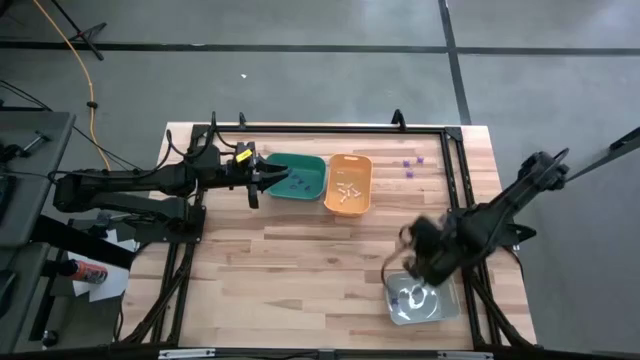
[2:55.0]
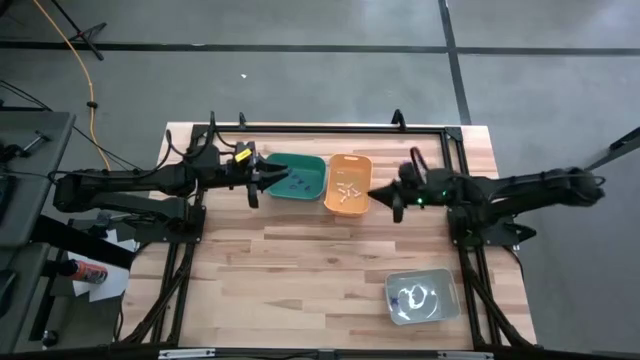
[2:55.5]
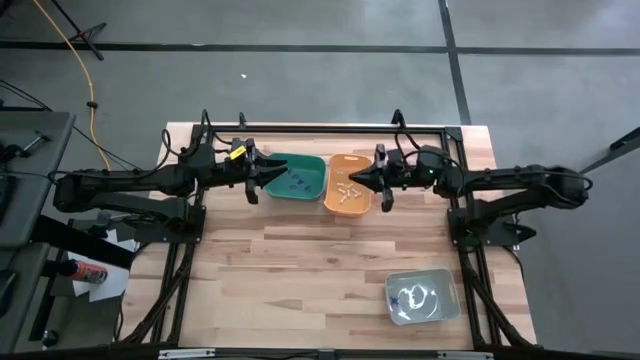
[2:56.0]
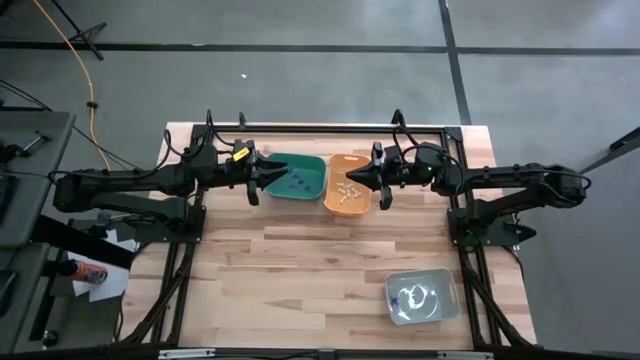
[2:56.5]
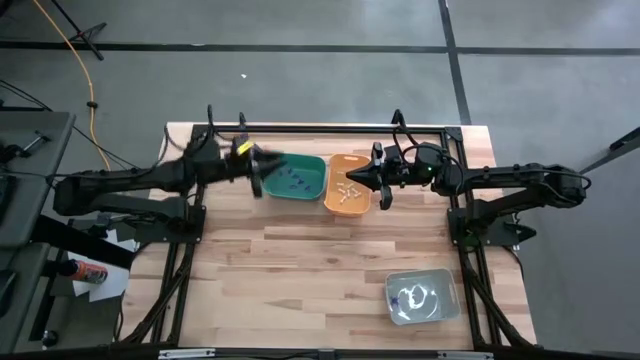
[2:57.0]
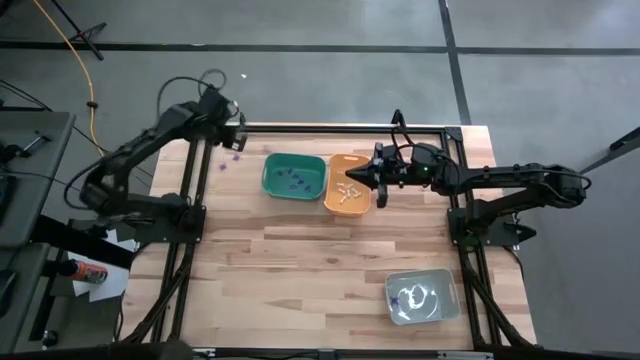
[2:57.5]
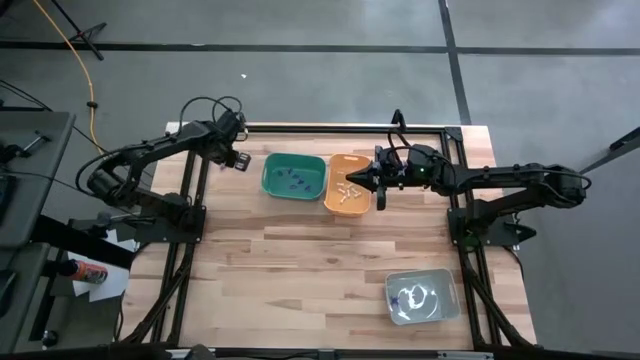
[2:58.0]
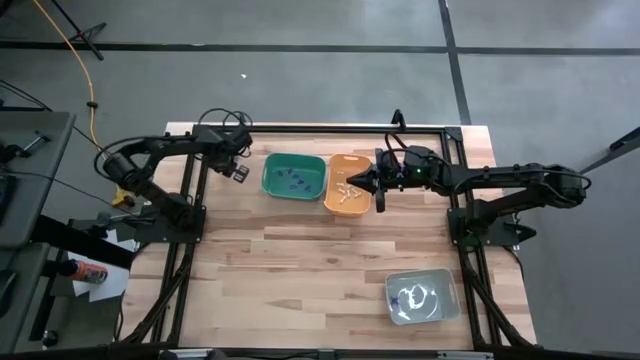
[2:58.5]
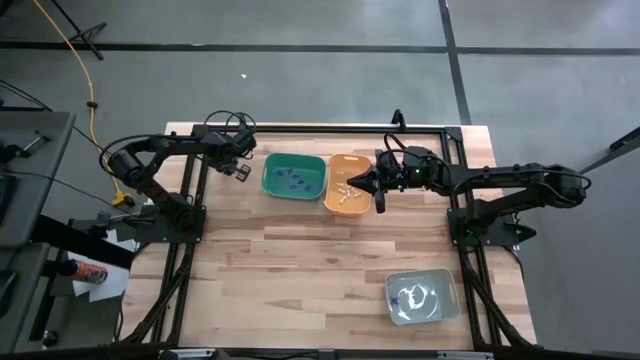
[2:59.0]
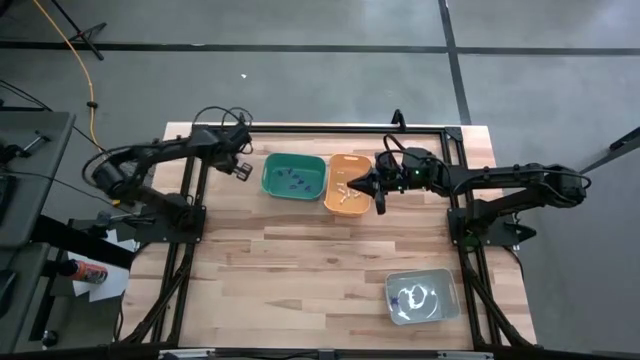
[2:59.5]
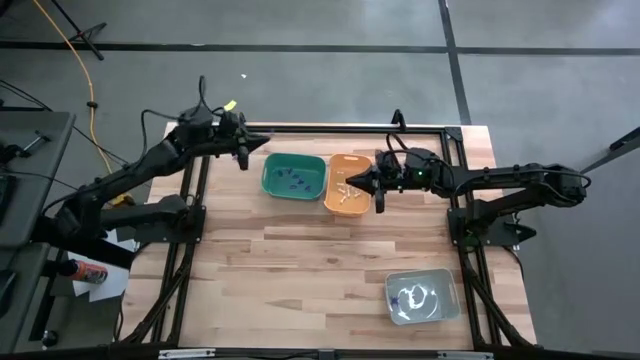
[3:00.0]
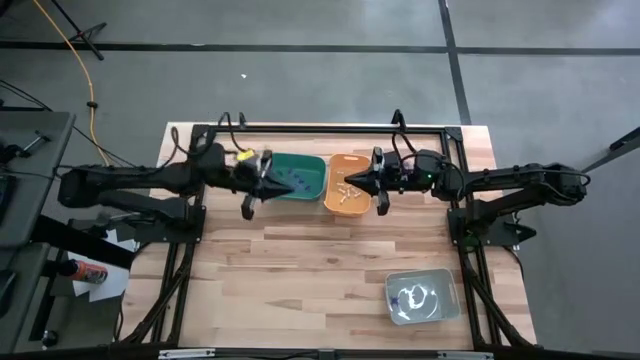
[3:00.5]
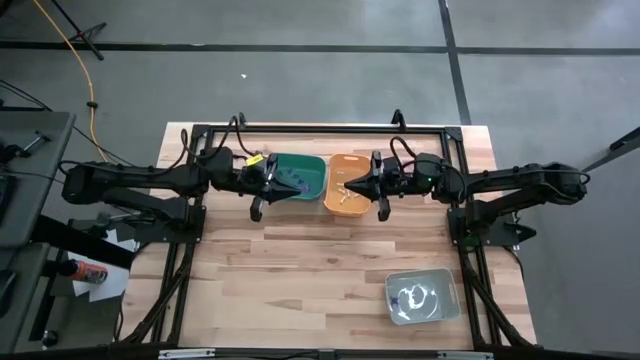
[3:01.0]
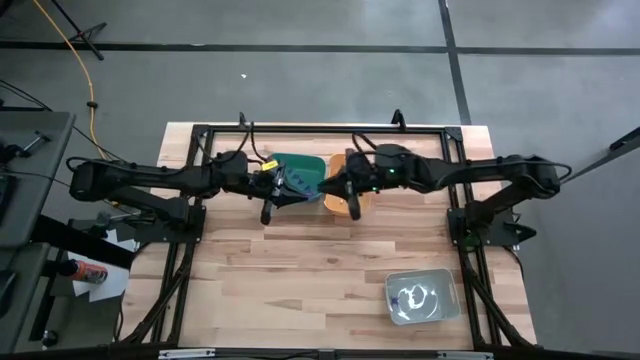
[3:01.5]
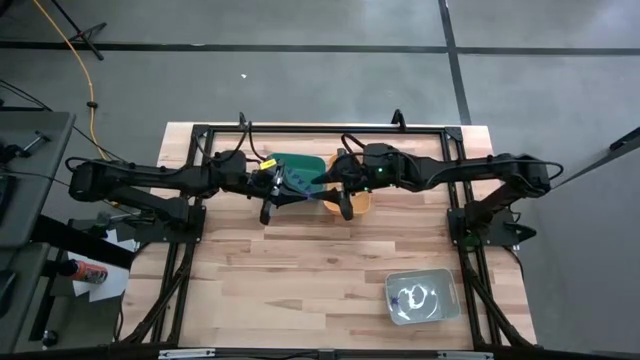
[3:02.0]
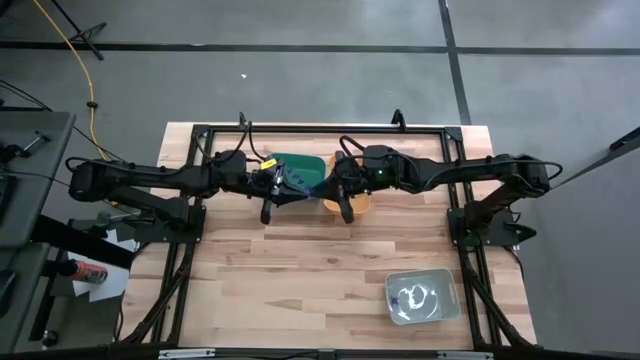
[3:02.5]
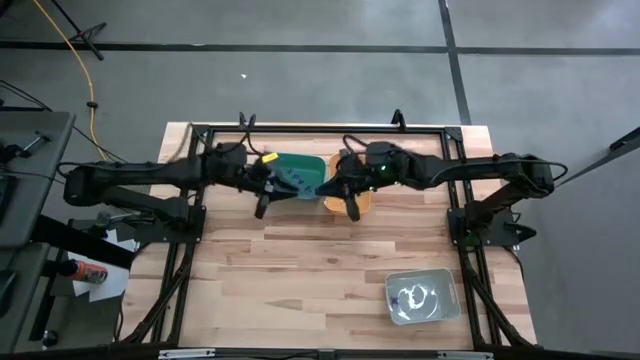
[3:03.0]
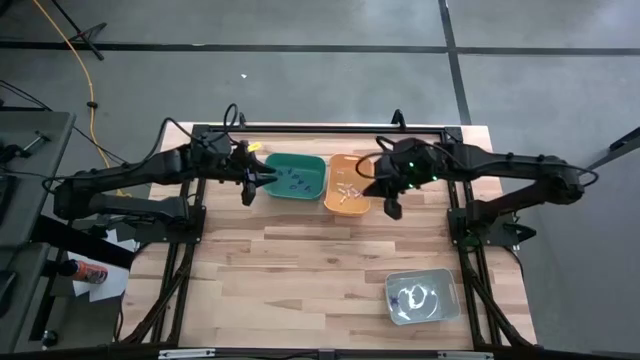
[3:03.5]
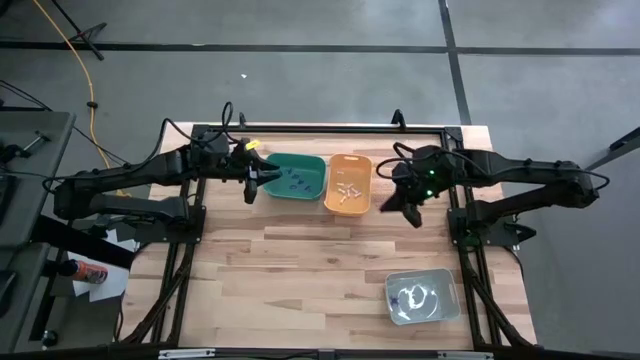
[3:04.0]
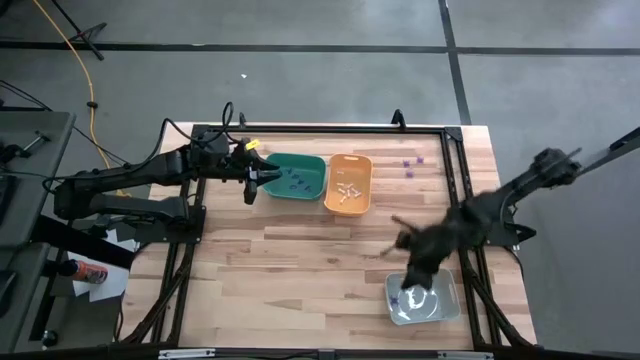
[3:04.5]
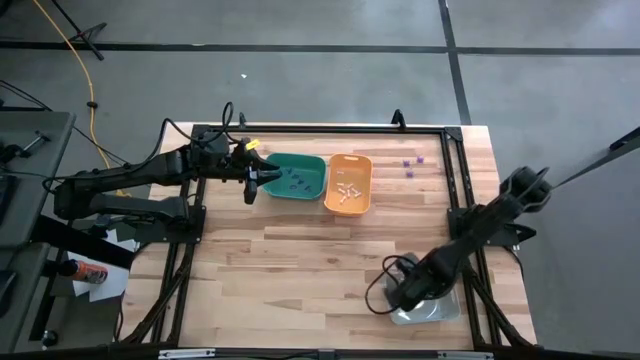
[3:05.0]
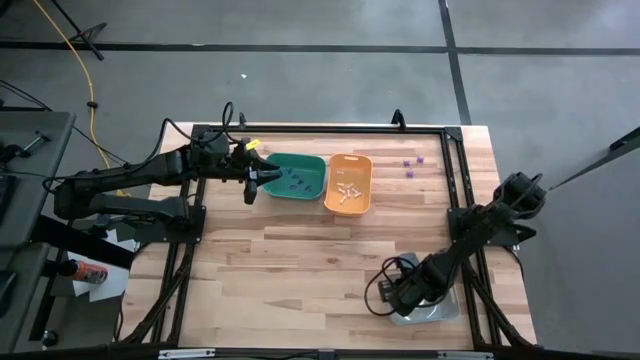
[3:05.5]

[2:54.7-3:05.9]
Task: Sort Halloween decoration
Put the violet spider toy into the gray bin

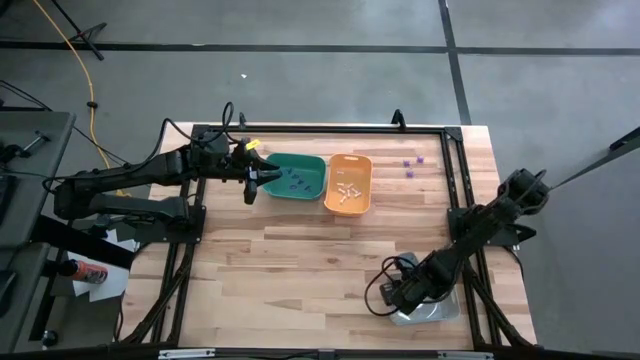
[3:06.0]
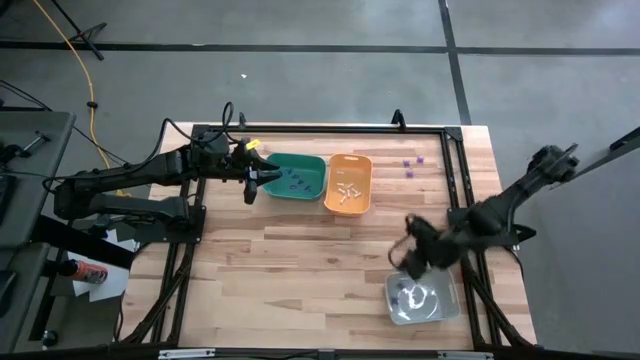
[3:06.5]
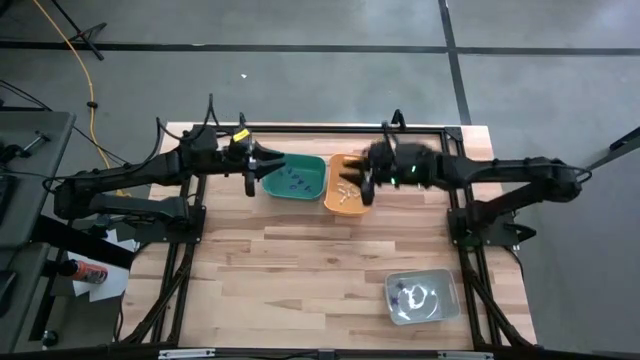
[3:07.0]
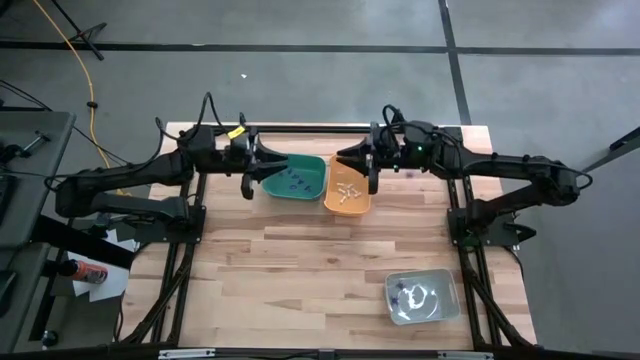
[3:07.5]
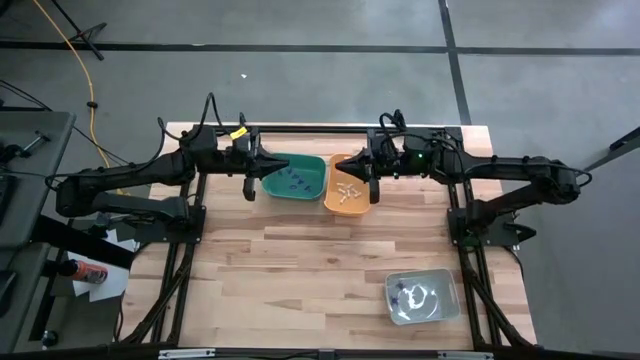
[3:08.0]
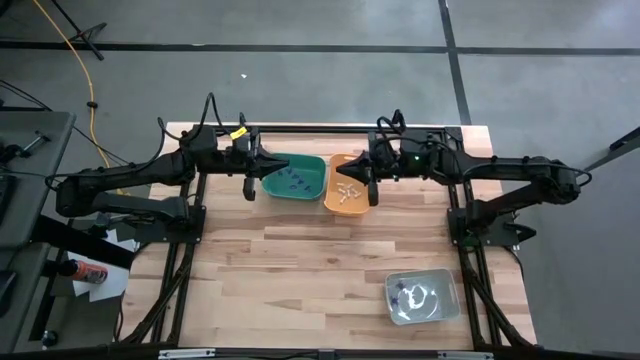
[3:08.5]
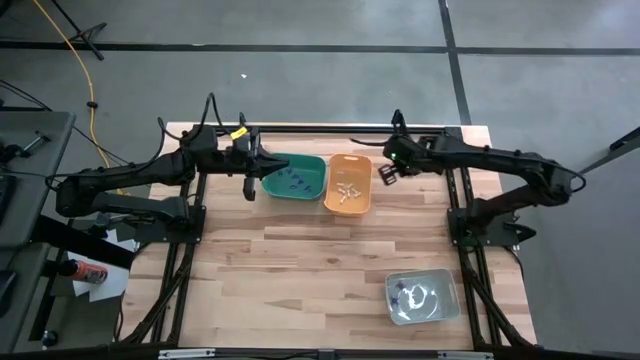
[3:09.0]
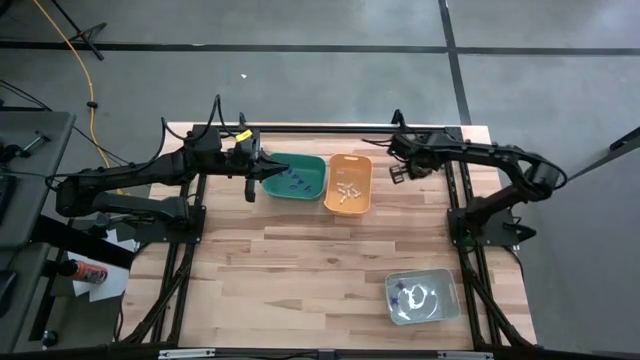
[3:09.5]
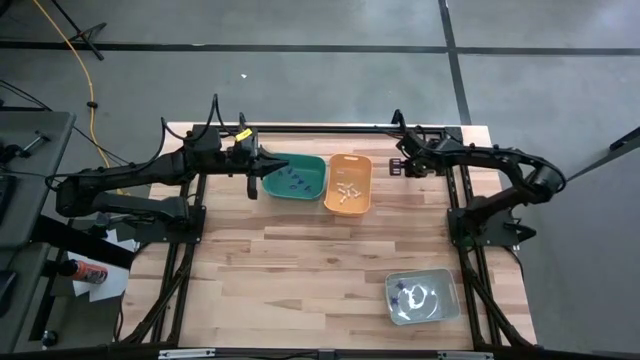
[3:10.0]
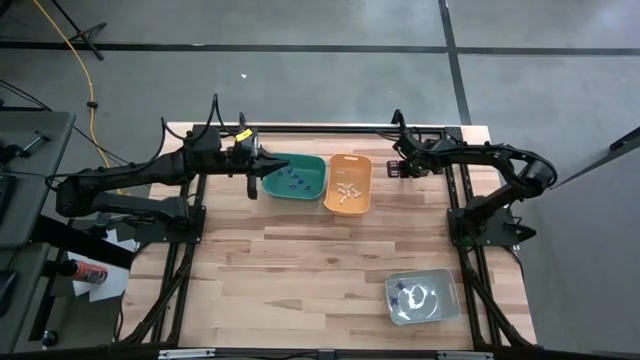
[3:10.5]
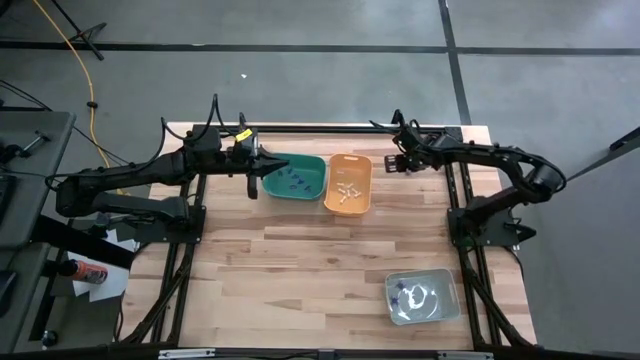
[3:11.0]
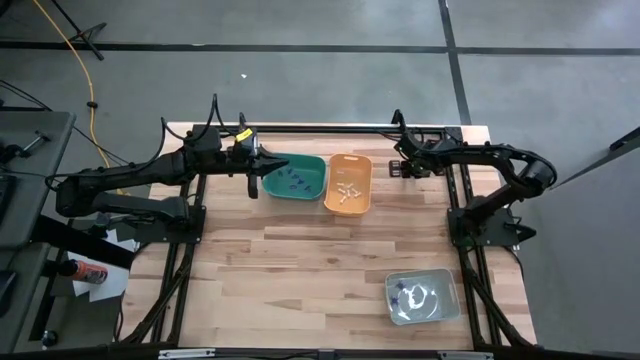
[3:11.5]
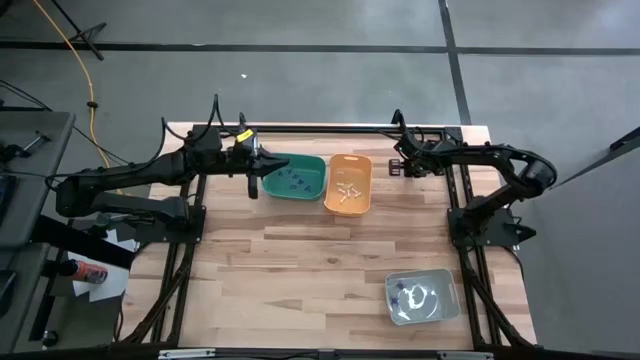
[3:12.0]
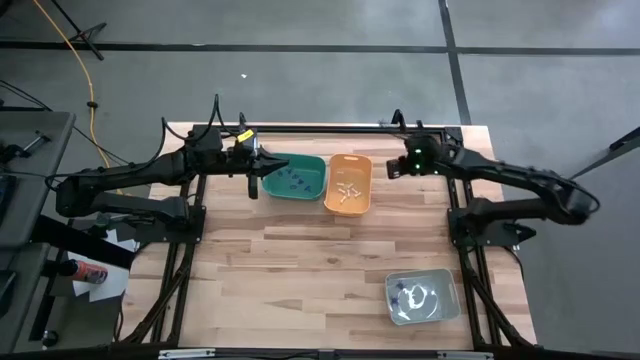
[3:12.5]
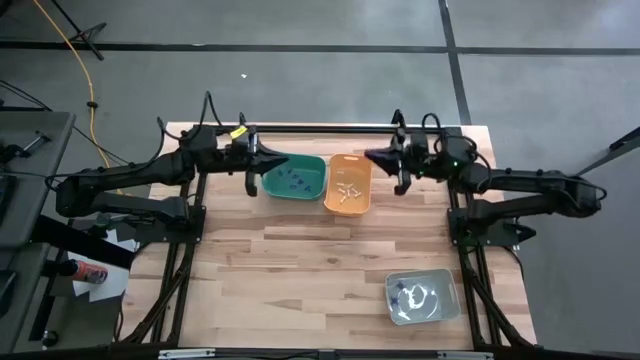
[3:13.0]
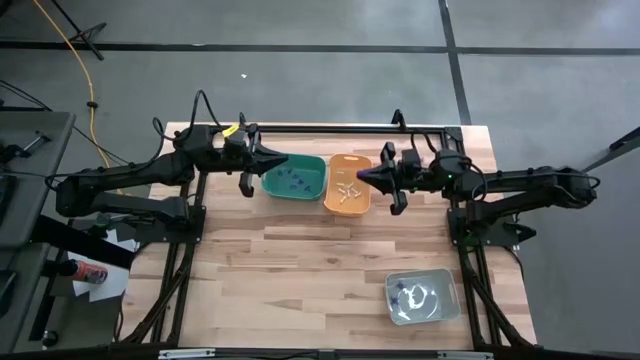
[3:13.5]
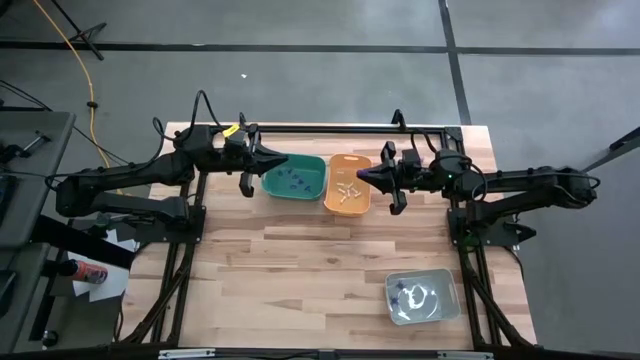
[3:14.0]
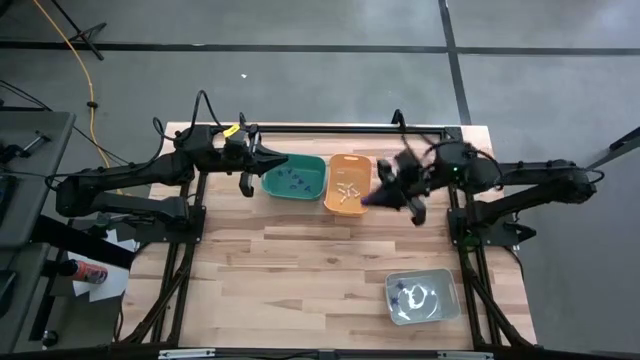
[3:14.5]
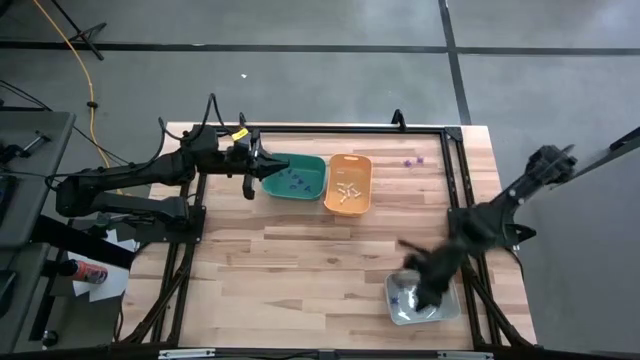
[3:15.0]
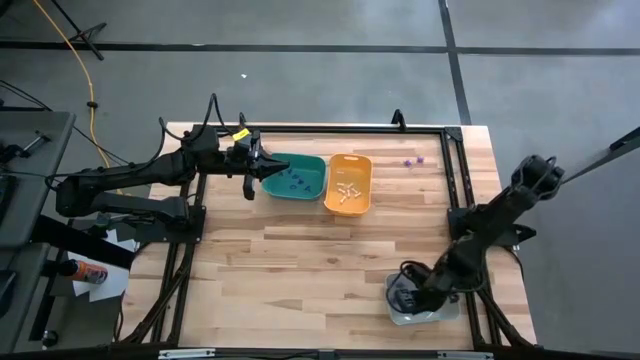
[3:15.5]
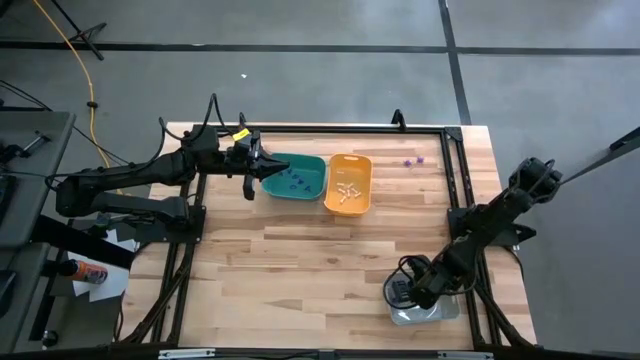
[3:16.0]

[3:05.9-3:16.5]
Put the violet spider toy into the gray bin

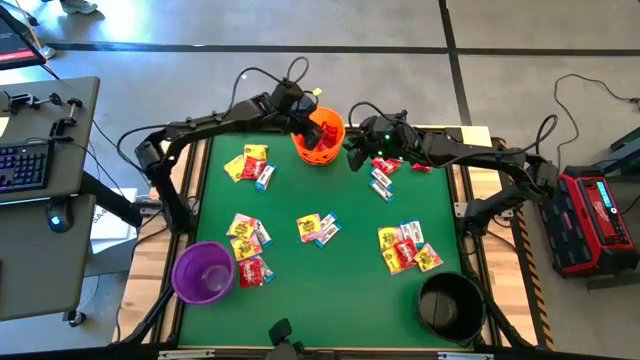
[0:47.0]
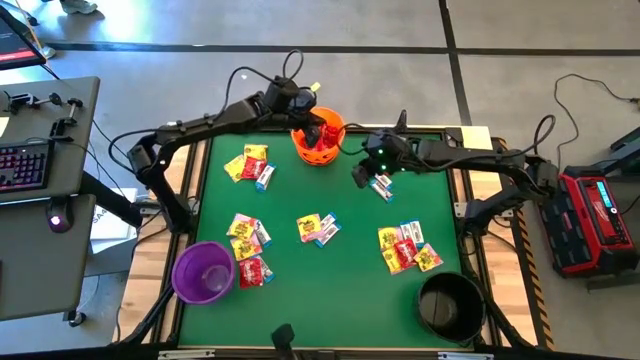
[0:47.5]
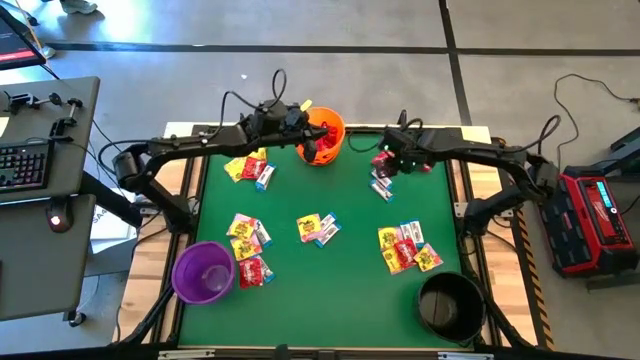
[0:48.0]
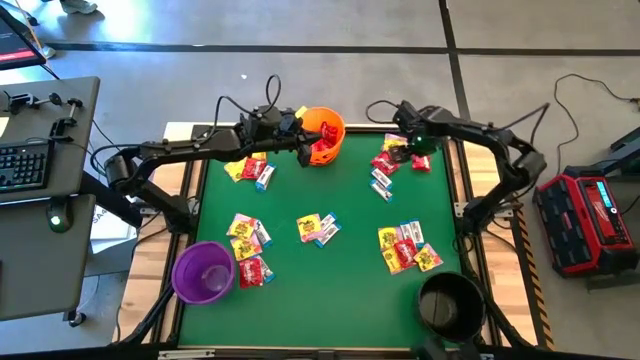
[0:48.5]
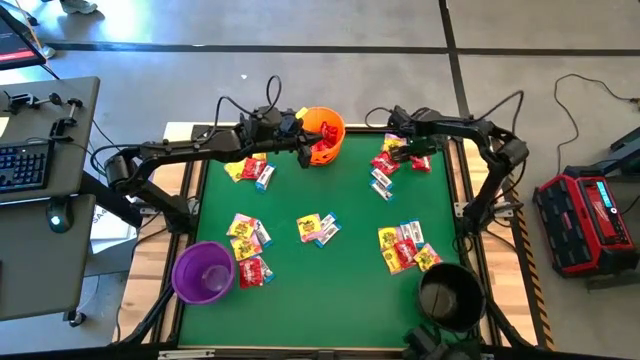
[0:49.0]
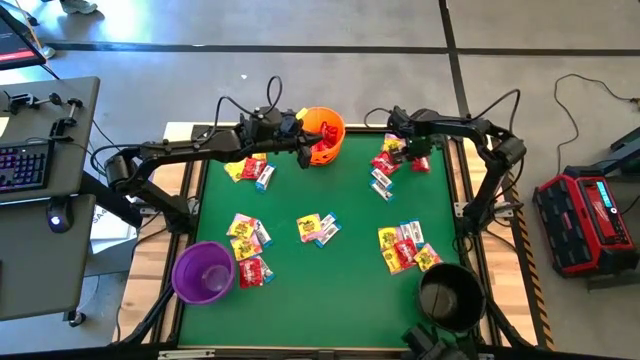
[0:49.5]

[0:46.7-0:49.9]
Task: Sort candy by brand, put in halloween buckets
Put the red candy into the orange bucket
